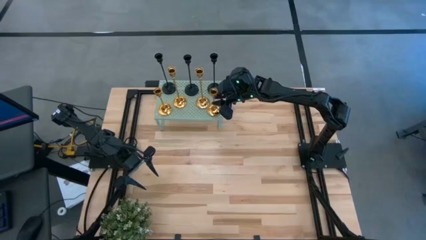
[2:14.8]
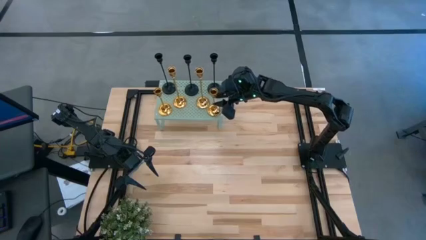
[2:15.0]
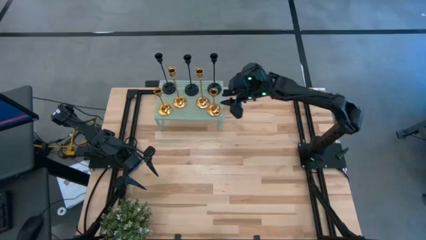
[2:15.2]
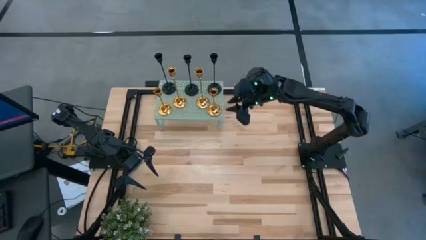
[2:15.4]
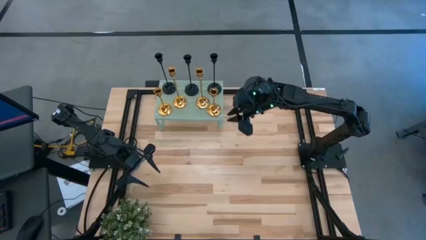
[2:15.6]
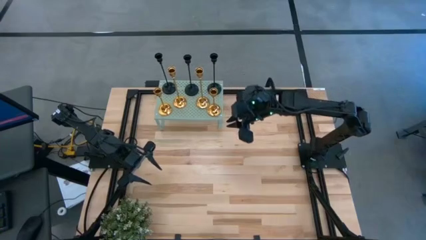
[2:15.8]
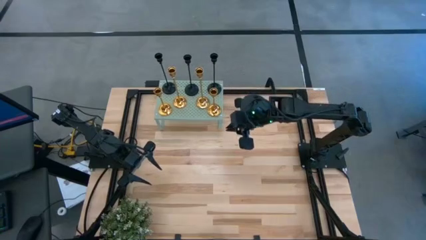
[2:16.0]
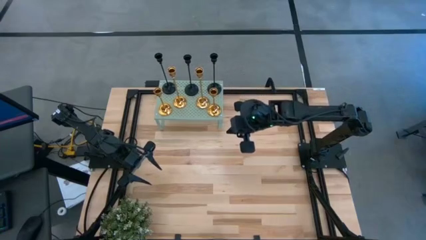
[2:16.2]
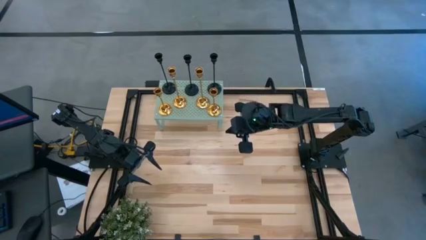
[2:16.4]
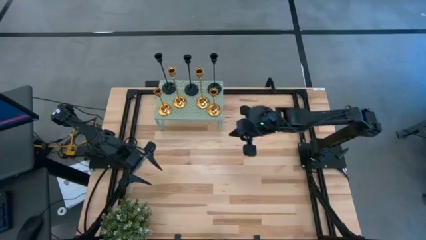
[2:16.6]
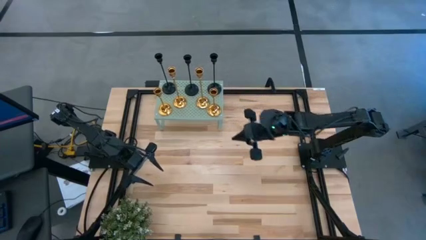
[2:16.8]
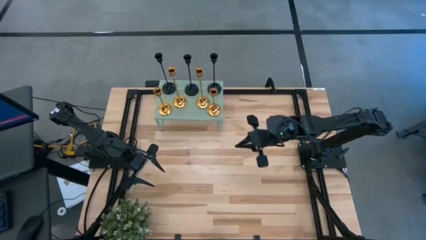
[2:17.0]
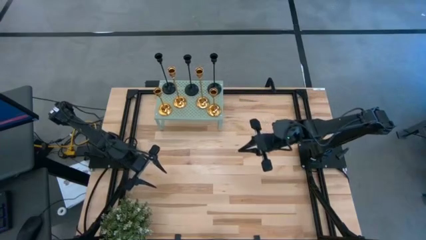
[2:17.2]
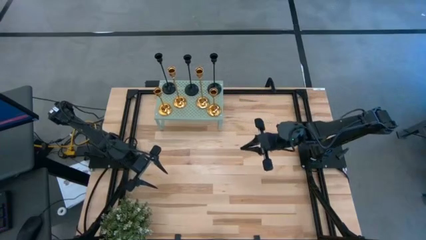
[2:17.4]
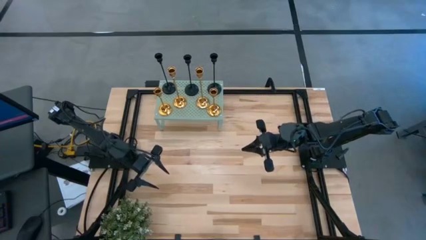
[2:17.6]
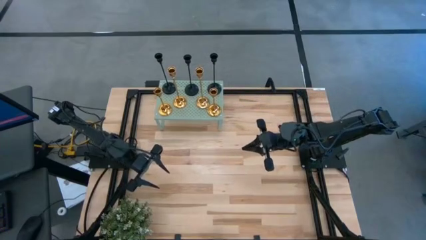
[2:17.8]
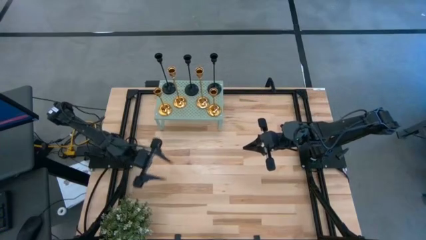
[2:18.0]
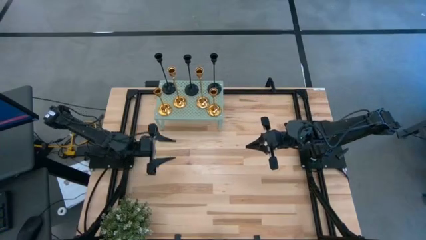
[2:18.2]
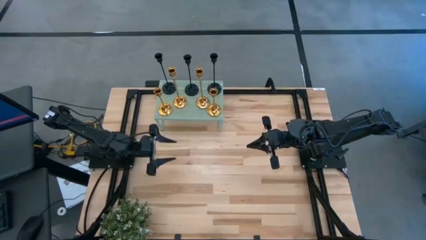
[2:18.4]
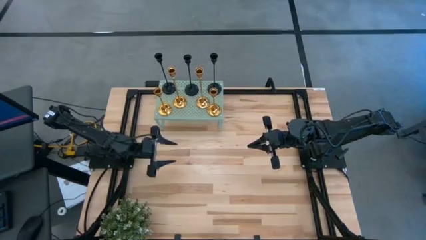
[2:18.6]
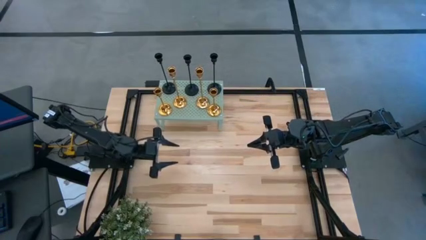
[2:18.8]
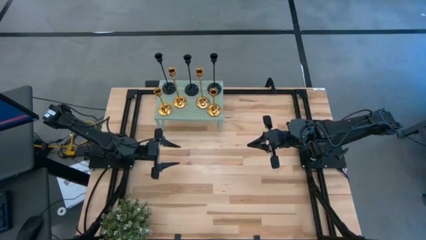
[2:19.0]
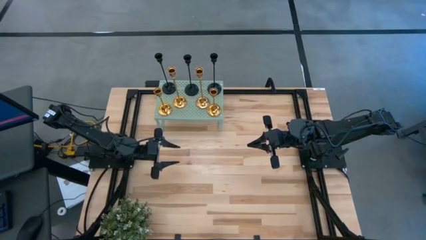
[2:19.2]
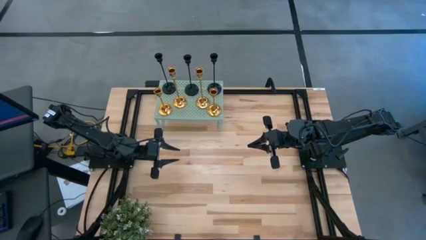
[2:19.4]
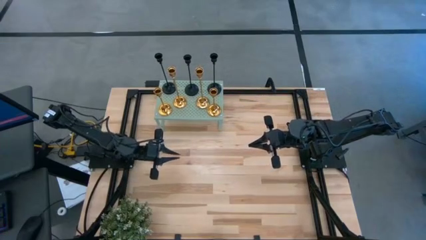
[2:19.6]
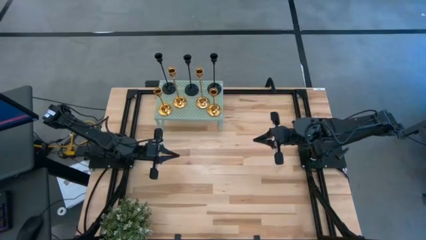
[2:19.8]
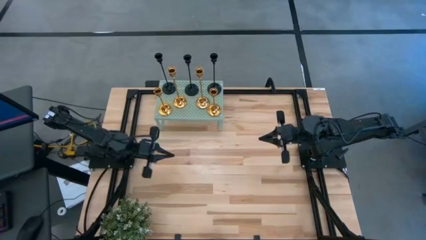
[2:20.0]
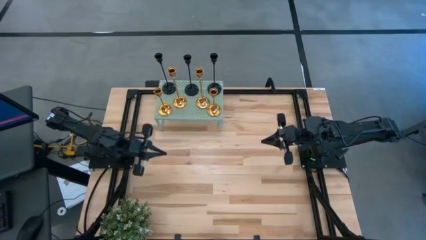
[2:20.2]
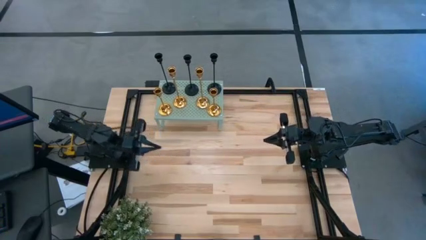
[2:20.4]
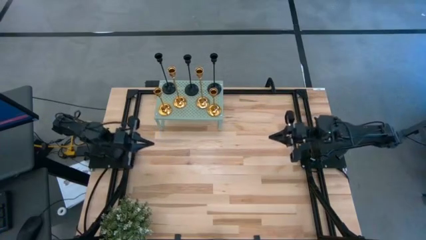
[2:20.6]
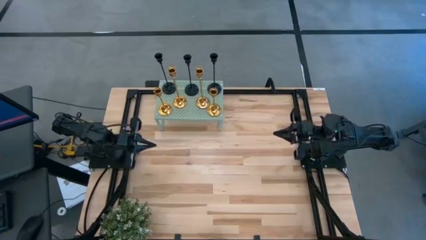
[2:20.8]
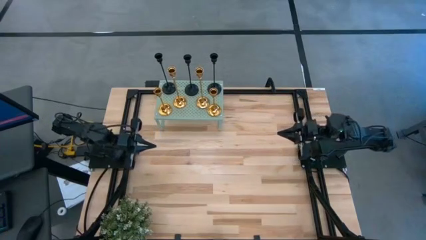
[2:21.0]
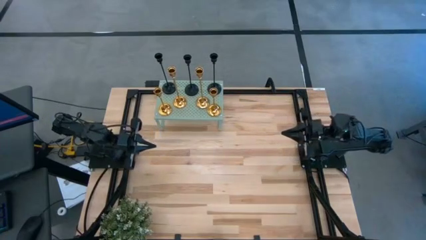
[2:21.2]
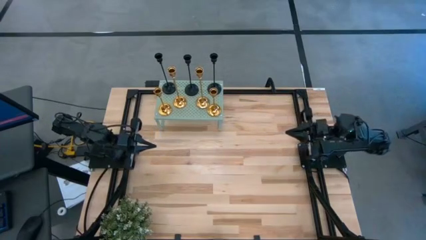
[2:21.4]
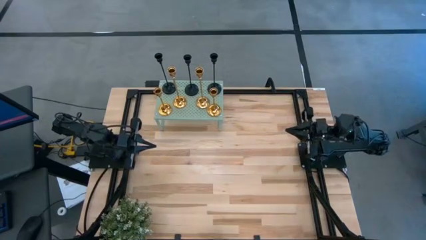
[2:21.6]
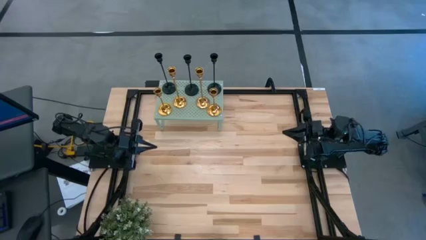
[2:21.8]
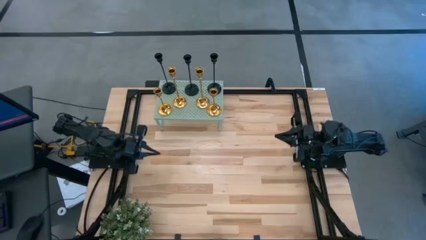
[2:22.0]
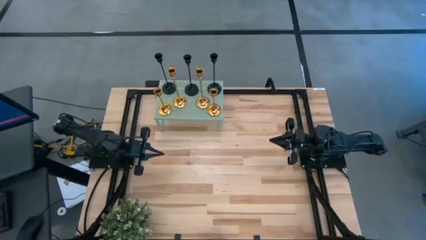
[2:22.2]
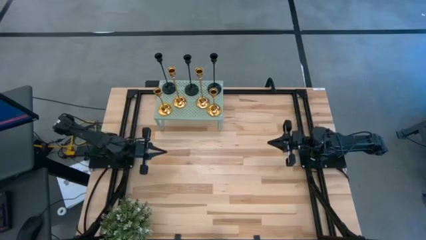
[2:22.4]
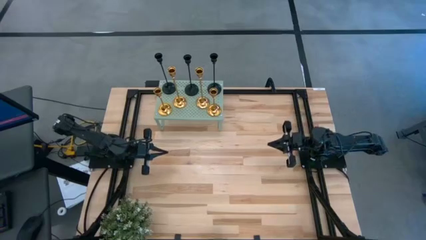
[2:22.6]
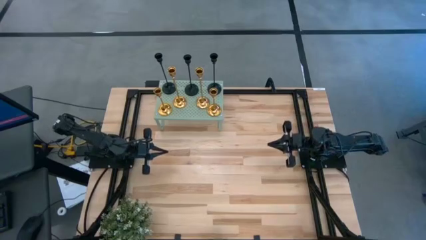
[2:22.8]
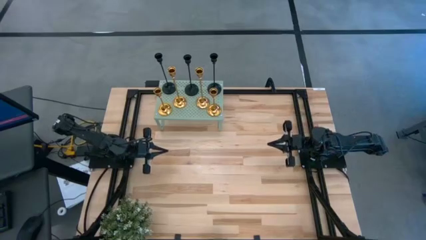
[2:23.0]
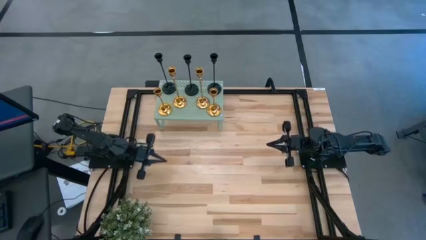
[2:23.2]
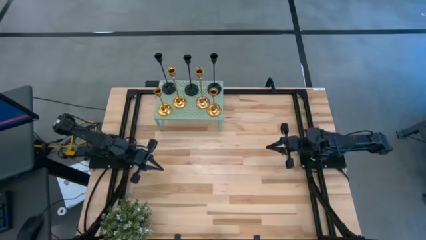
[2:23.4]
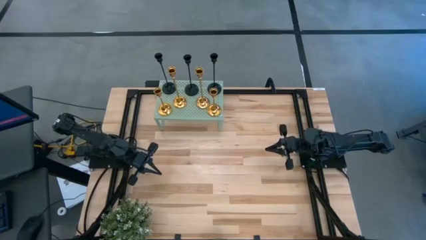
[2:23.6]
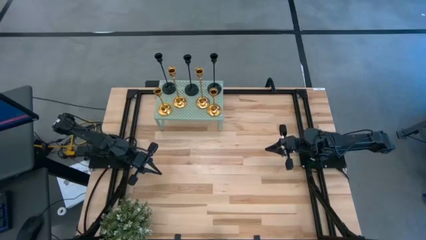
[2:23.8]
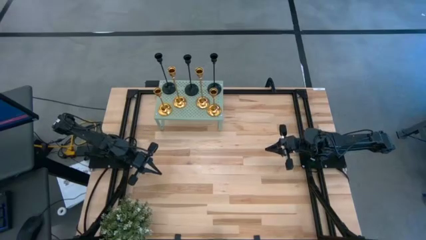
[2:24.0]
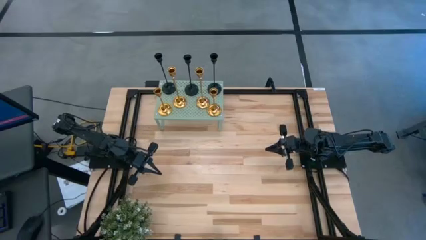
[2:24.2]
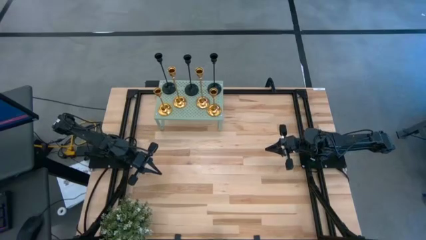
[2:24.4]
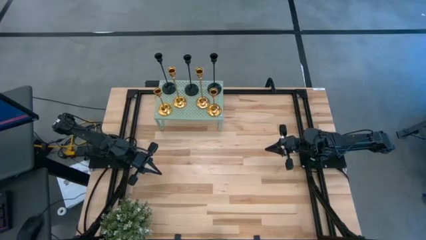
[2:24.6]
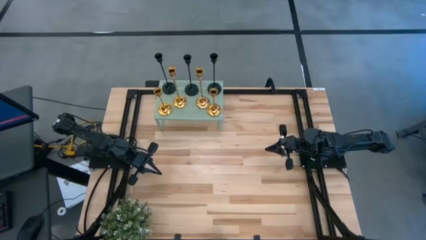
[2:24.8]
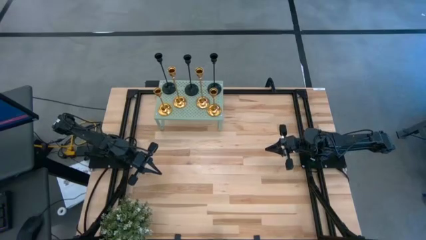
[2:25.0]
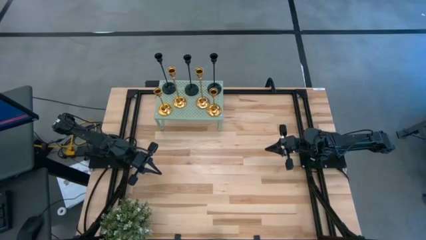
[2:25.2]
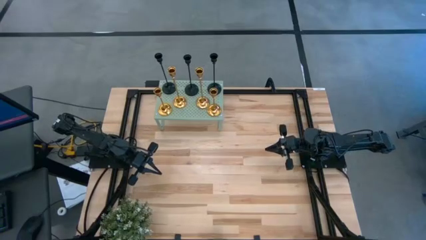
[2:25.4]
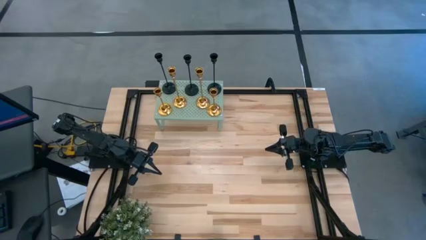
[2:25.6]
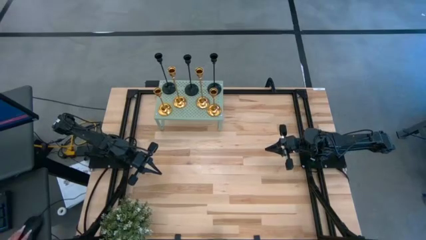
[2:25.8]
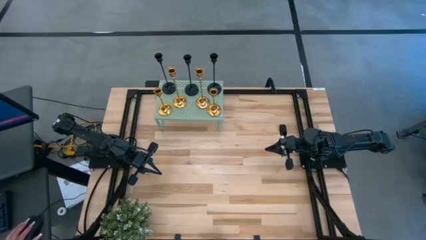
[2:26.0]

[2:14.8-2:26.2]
Task: Pick & Place candle stick holders
Return to Home Position

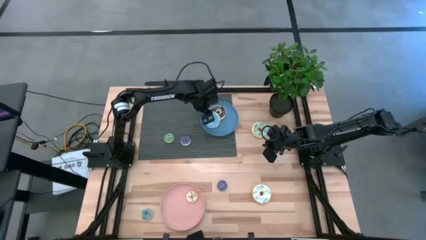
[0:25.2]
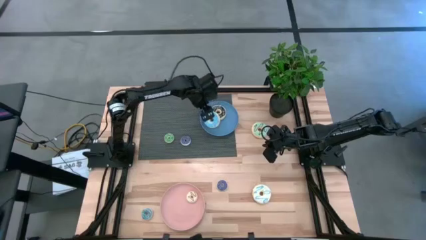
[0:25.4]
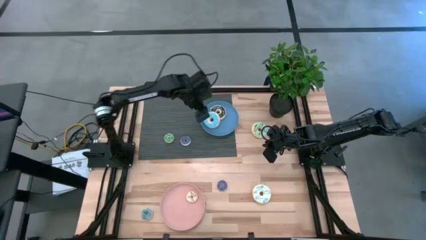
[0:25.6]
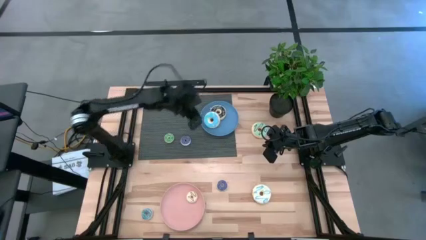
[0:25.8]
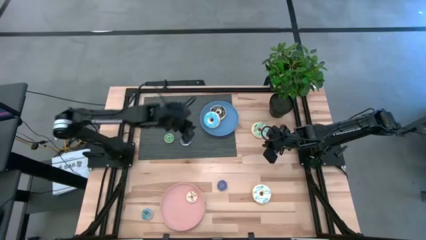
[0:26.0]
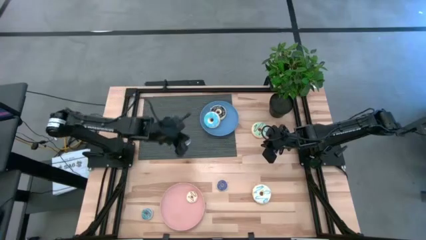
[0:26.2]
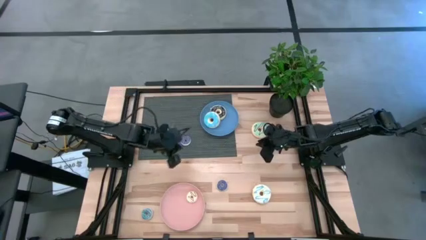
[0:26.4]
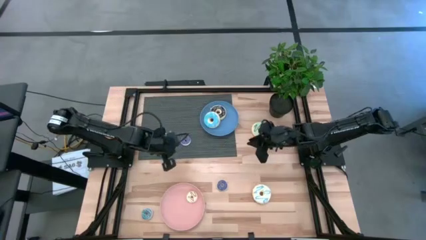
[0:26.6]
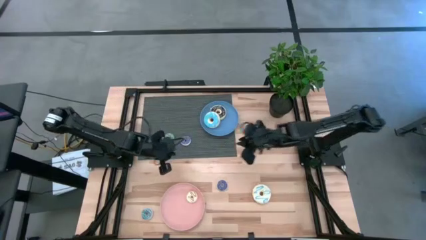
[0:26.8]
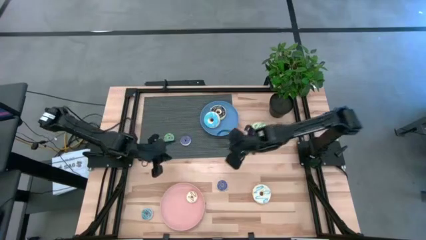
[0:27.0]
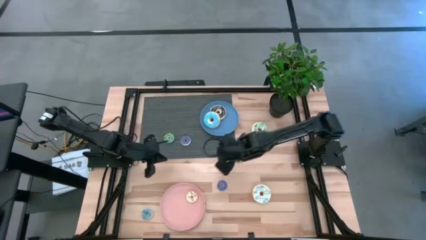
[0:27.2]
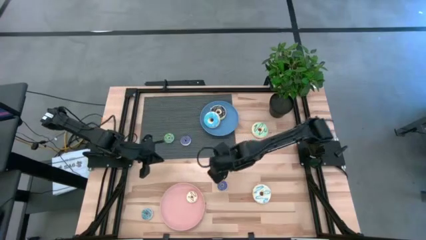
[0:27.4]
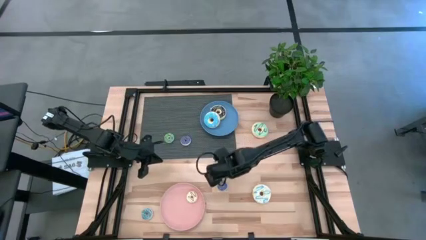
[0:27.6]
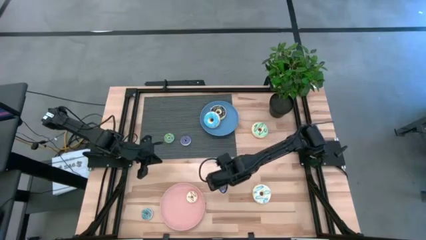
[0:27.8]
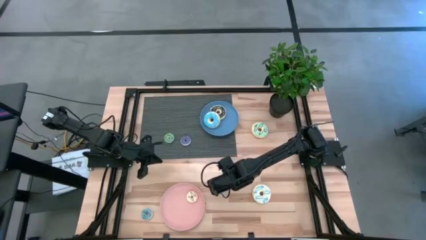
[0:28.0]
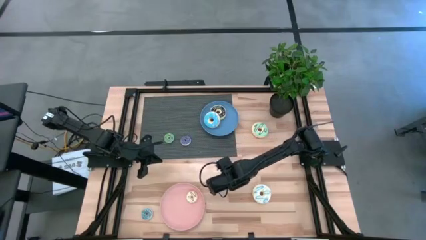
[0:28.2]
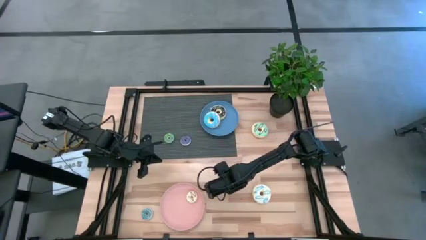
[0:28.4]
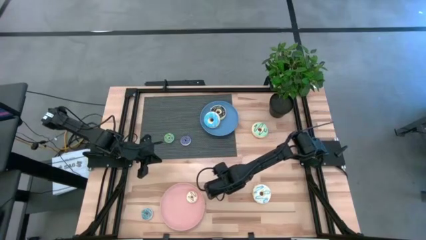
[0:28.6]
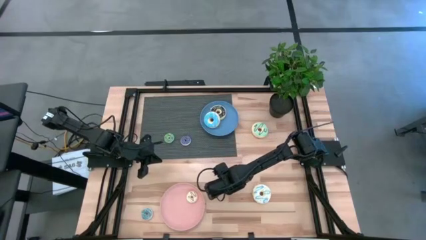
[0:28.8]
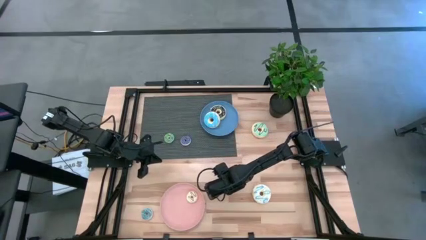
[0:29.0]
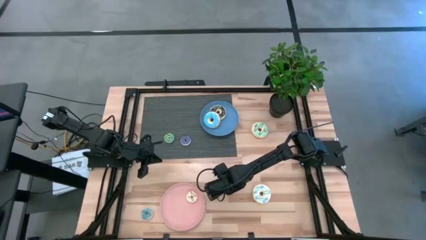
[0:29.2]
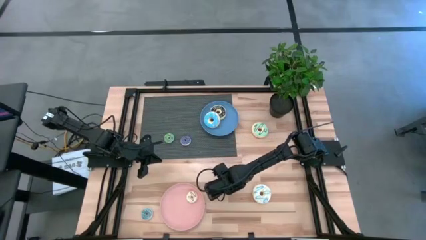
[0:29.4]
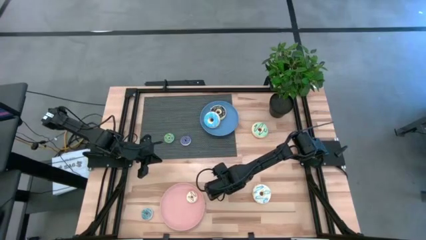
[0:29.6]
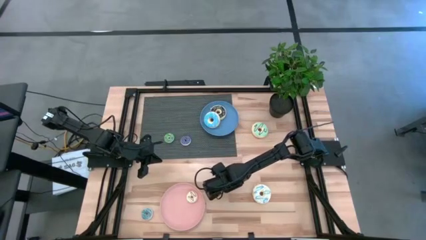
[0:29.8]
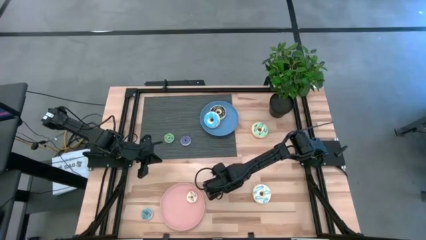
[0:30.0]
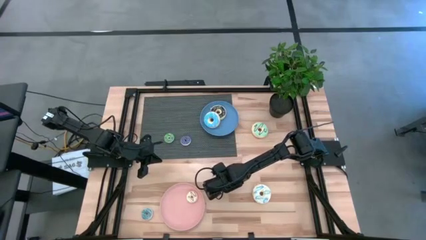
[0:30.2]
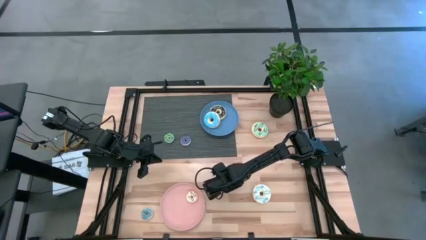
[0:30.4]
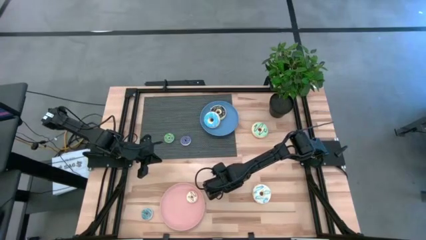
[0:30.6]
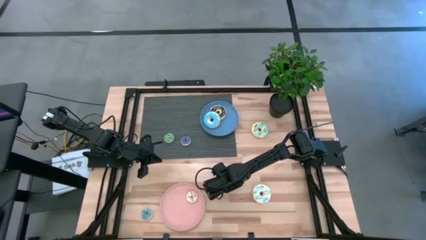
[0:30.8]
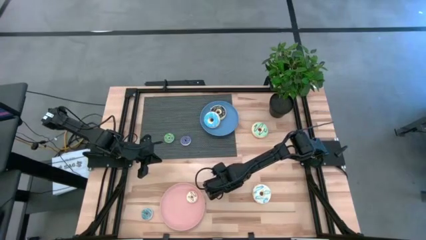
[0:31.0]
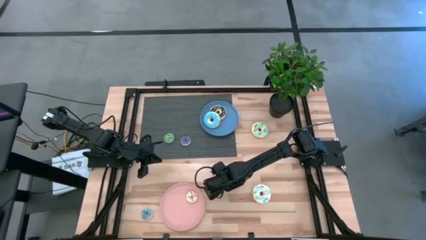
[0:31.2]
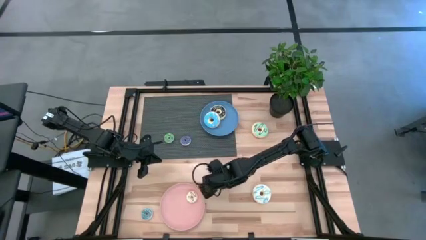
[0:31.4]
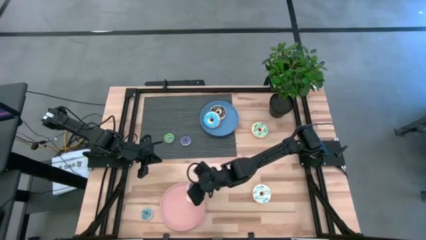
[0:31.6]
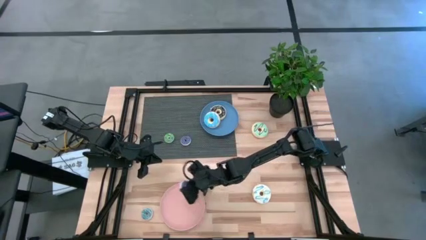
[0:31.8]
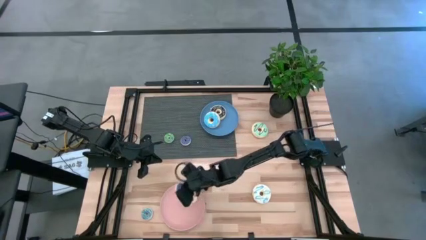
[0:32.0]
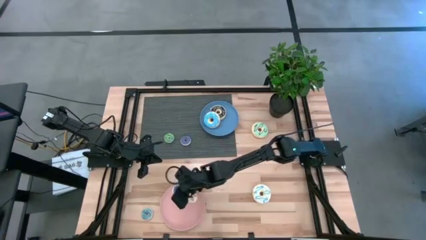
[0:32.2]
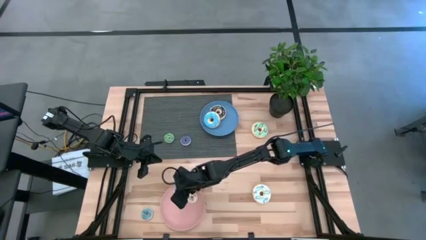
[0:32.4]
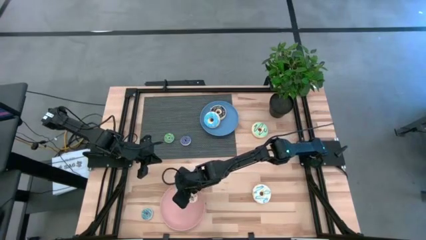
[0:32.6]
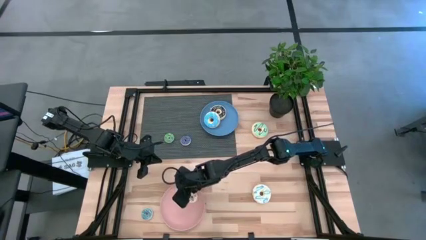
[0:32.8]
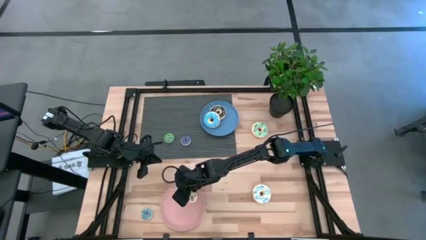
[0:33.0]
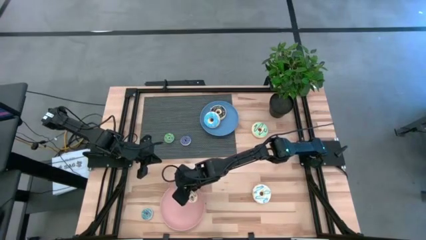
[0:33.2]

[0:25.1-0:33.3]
Task: Pick & Place donuts
Put the small dark blue donut on the pink plate
